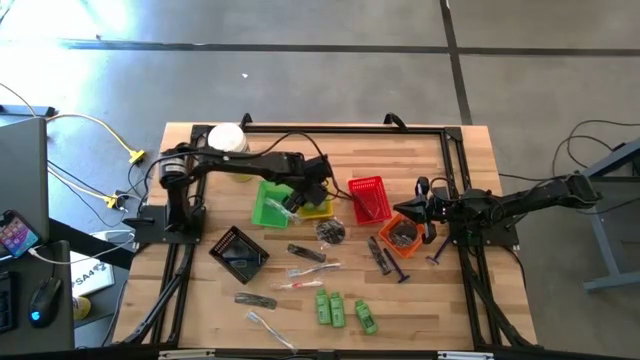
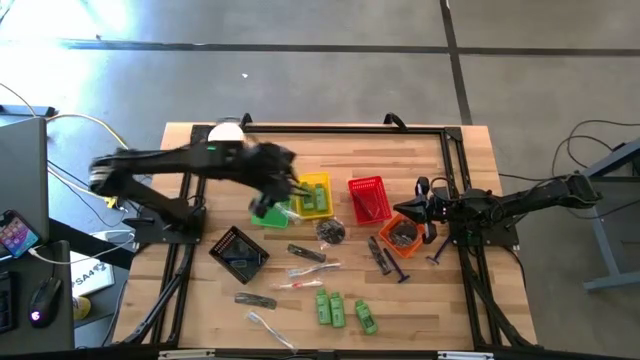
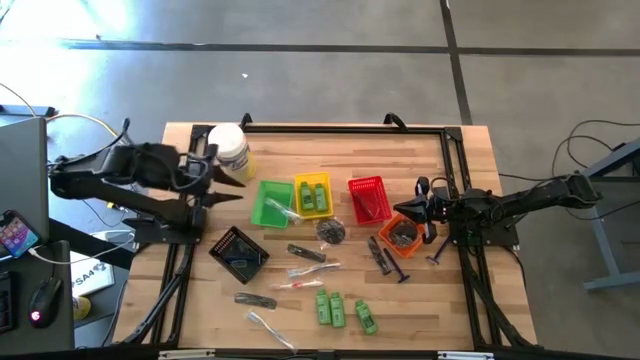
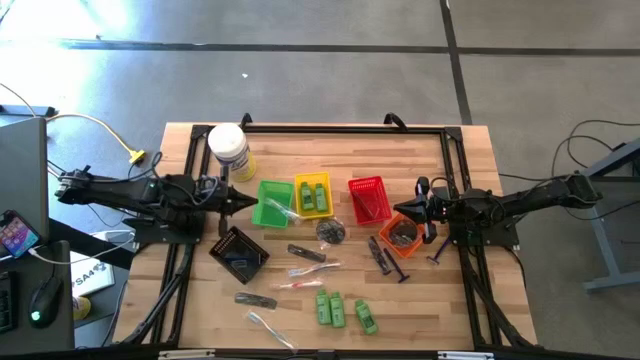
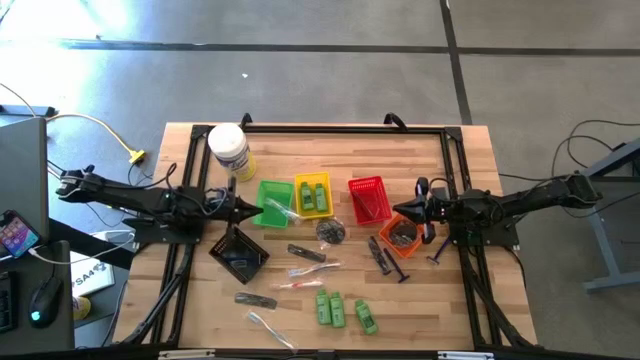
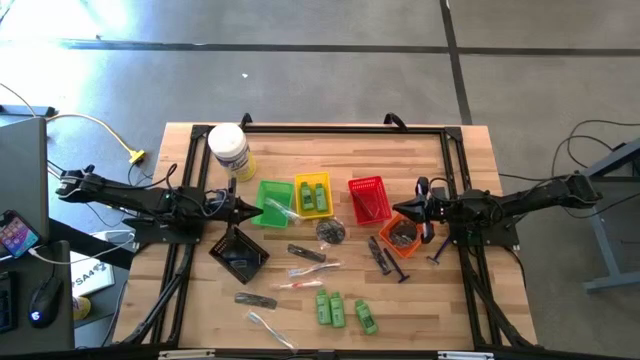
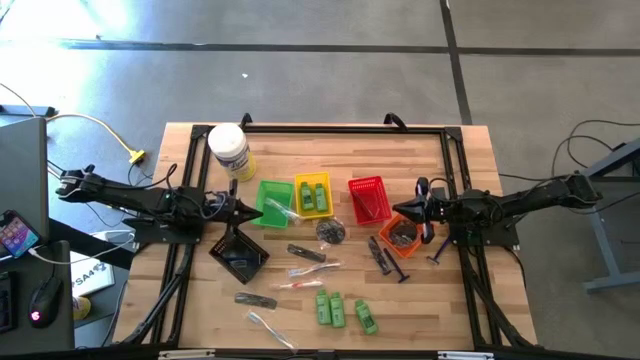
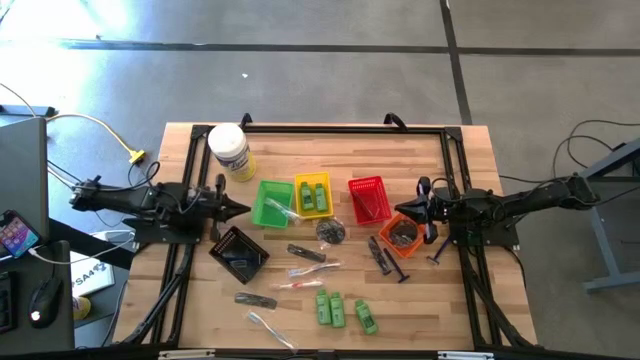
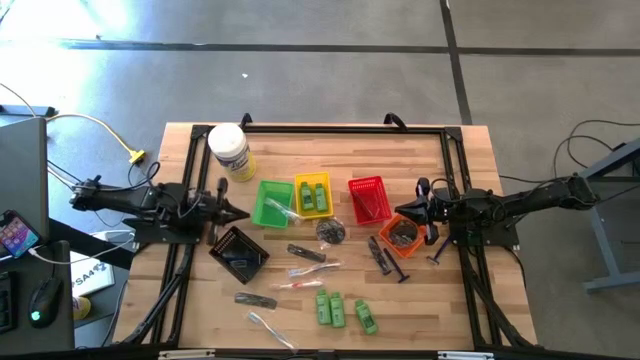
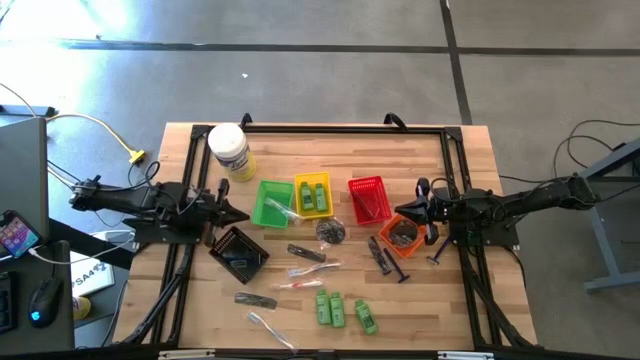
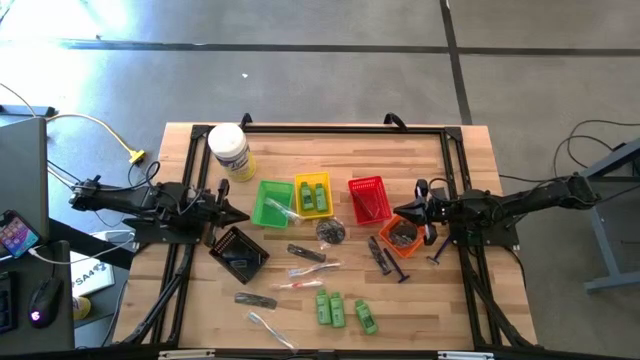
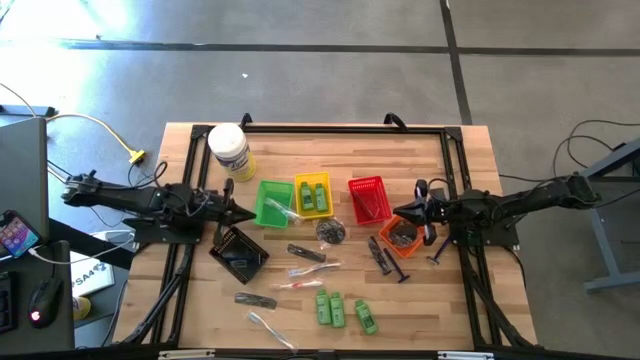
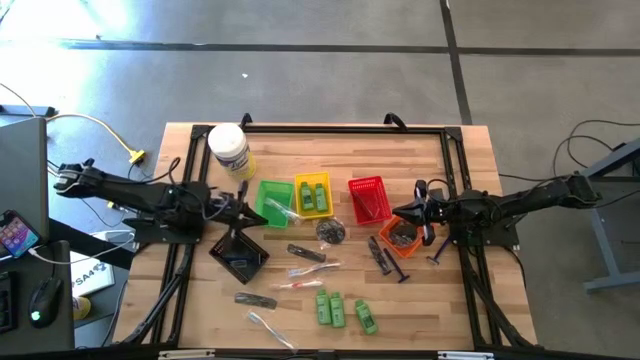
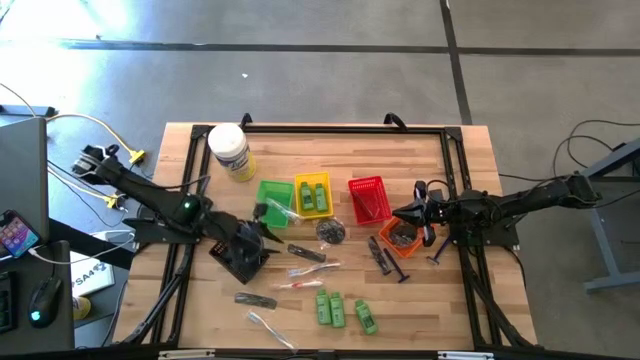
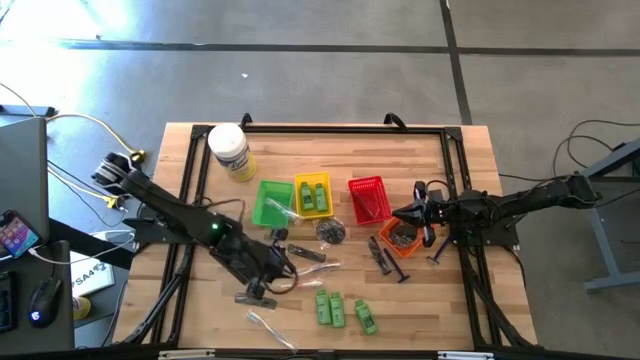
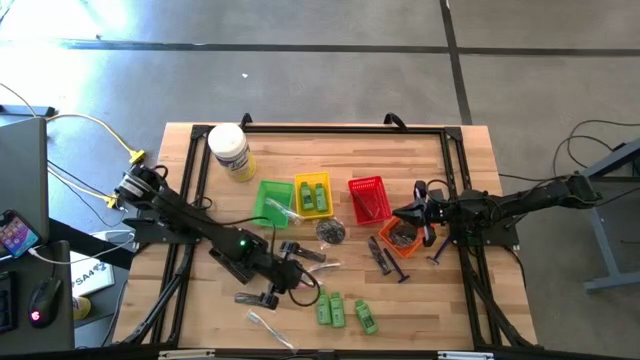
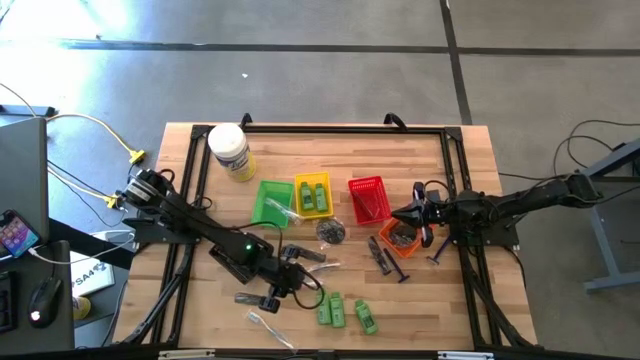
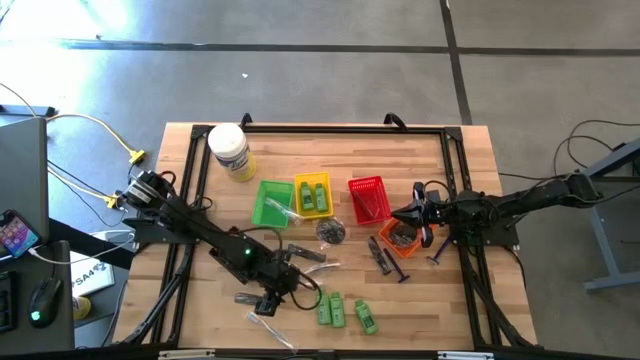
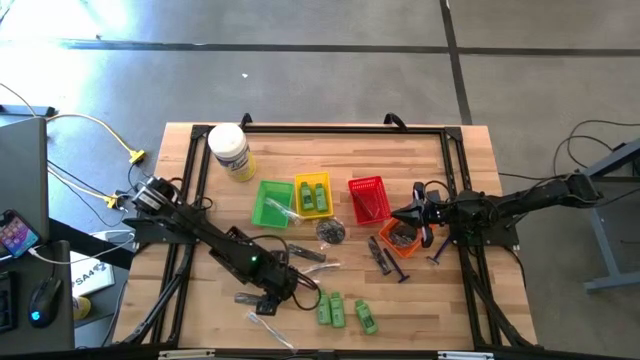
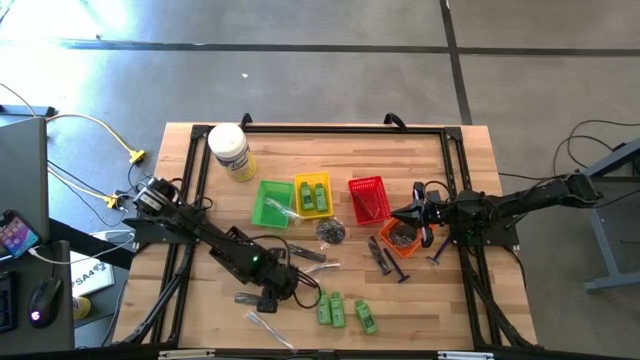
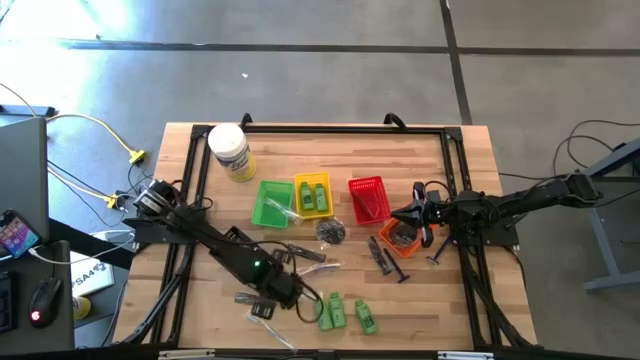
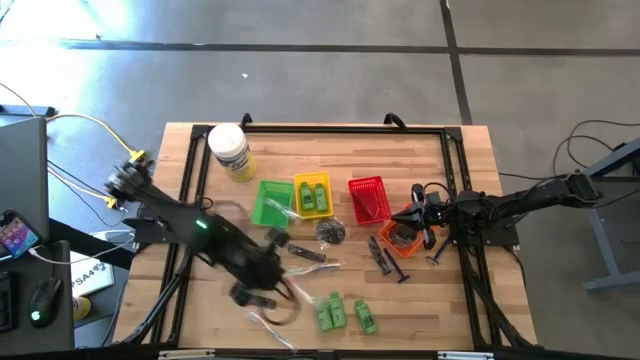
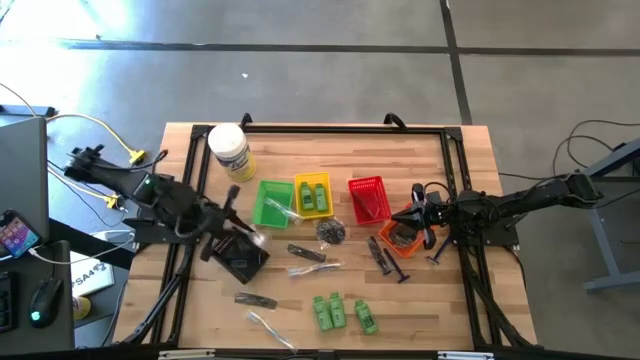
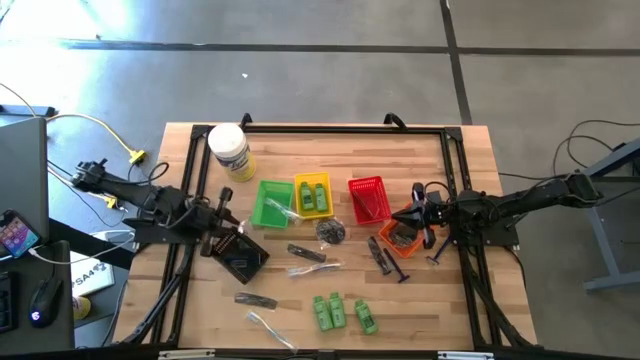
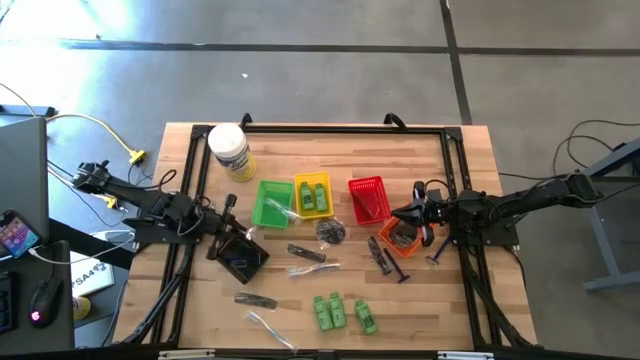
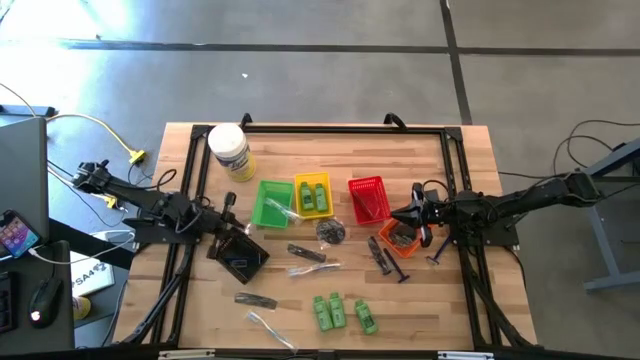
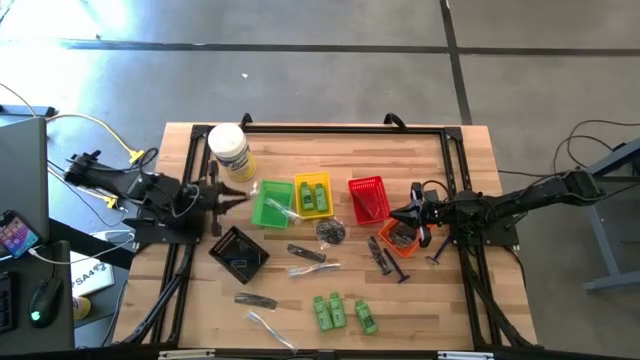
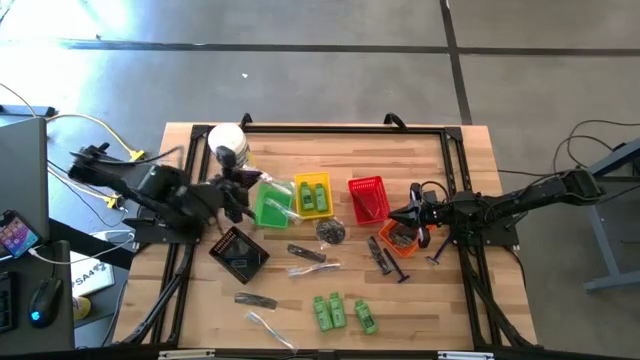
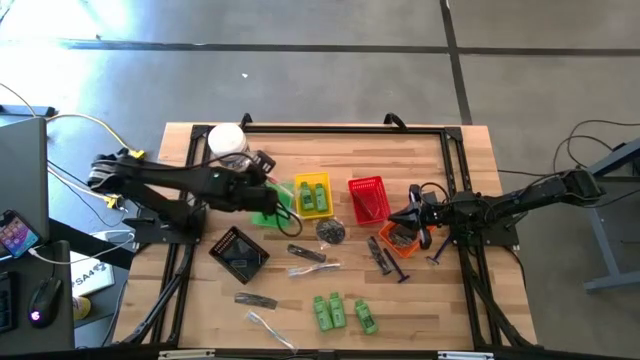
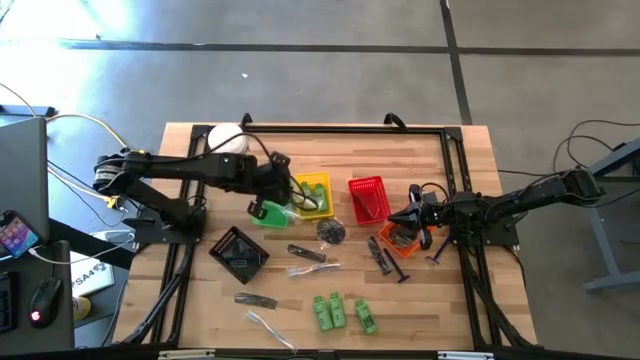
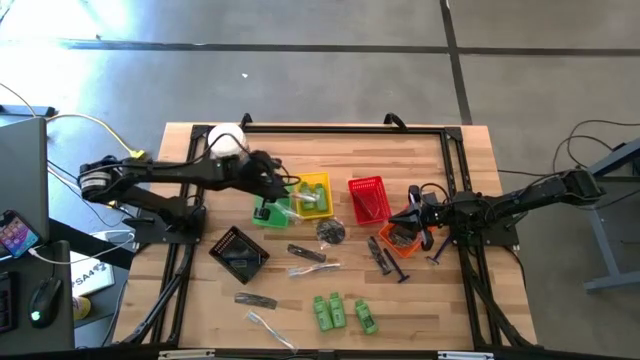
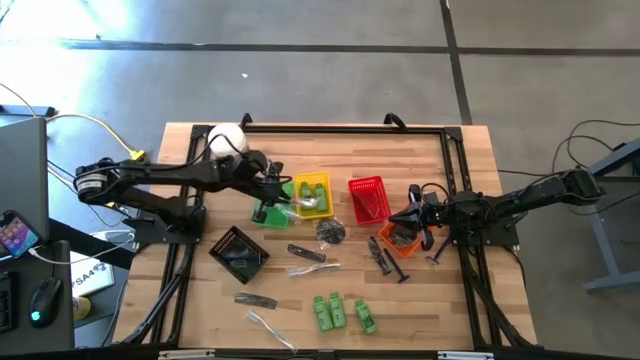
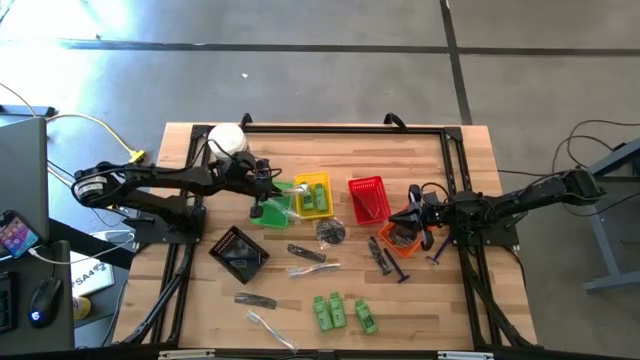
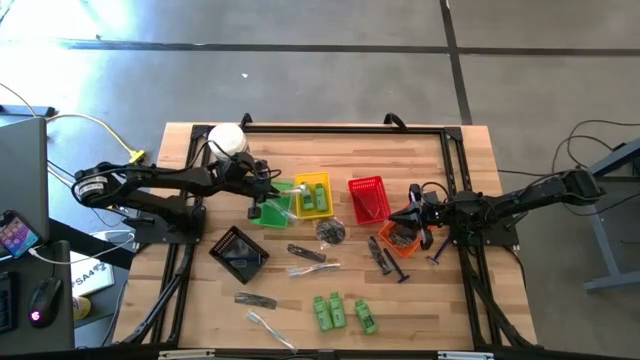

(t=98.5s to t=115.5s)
Task: Pick & Place Travel size toiletries
Put the red toothbrush into green basket

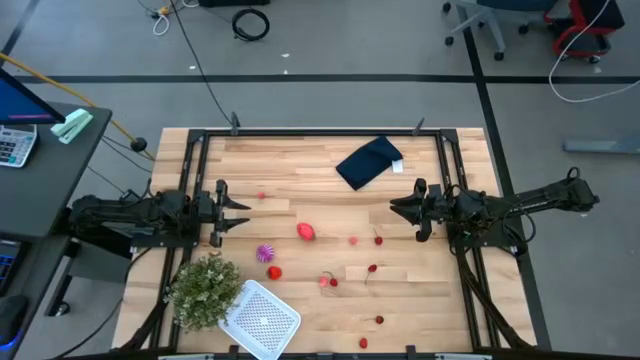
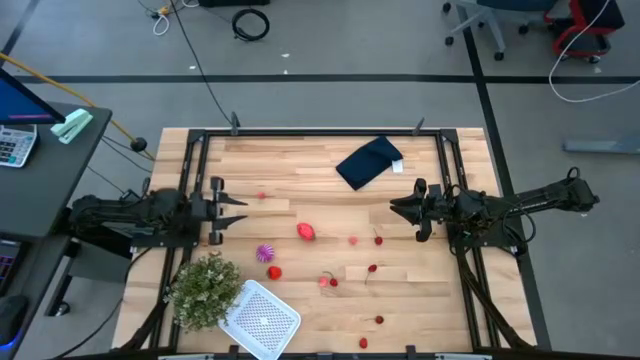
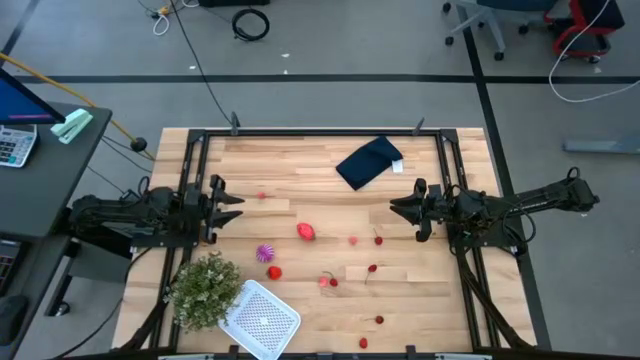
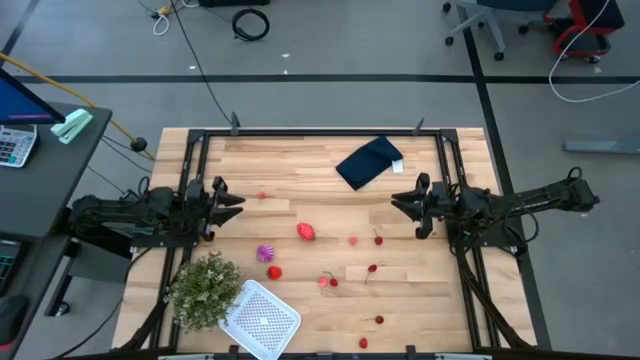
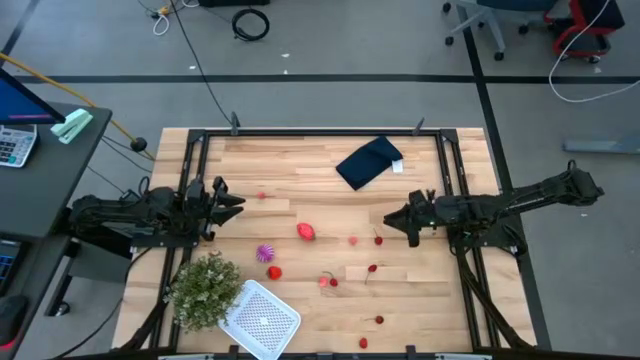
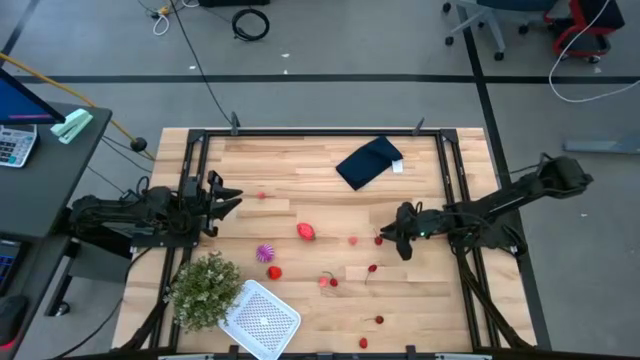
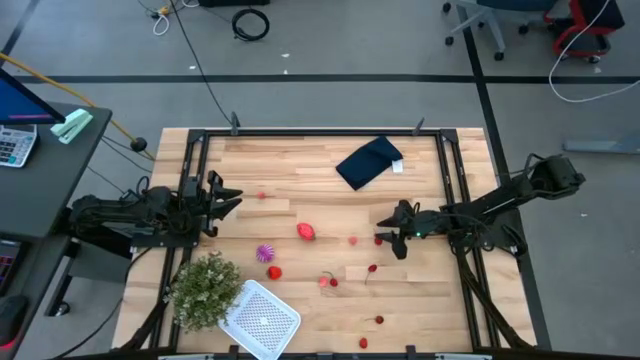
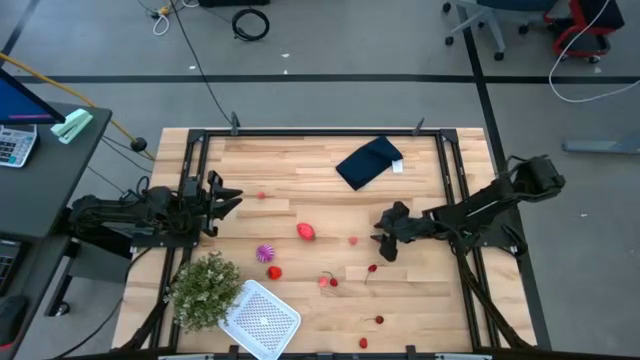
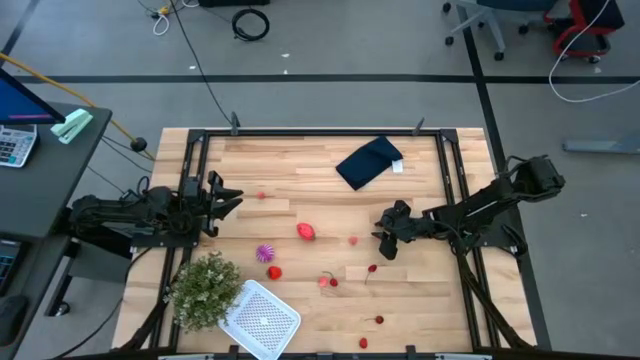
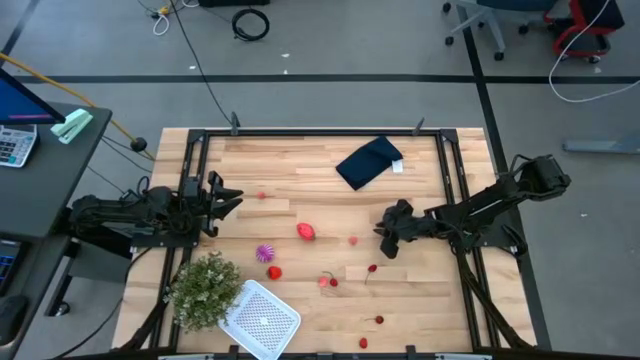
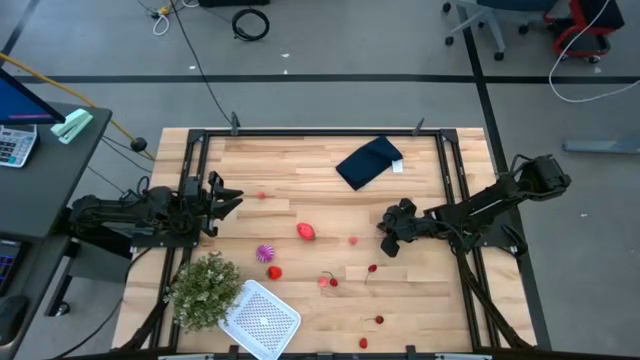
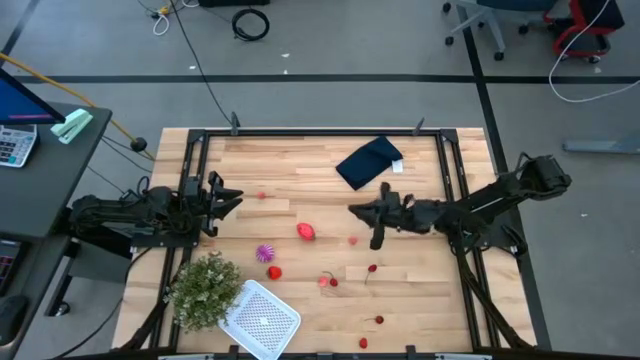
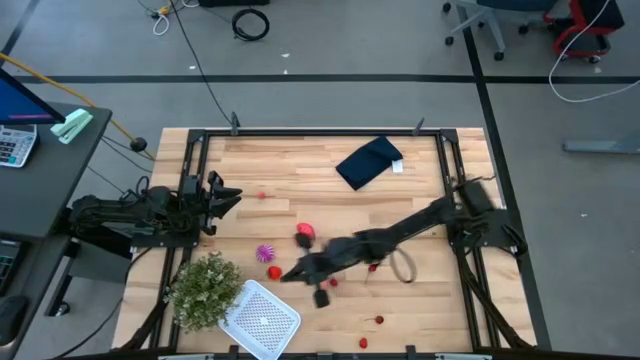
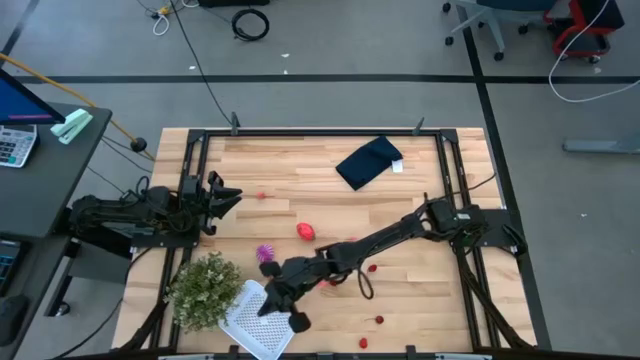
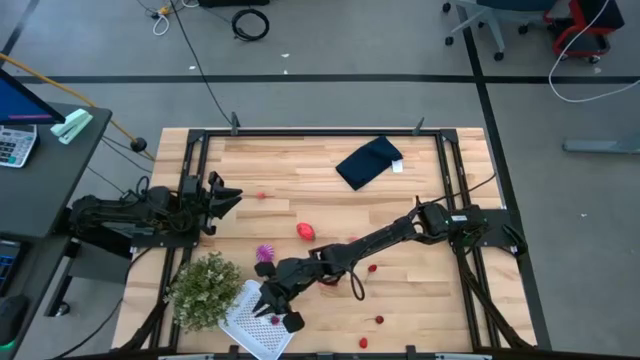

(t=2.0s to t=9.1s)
Task: Pick and placing Produce into tupperware
Put the cherry into the white bin
